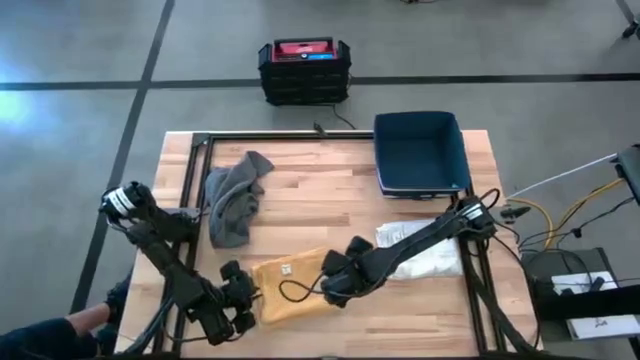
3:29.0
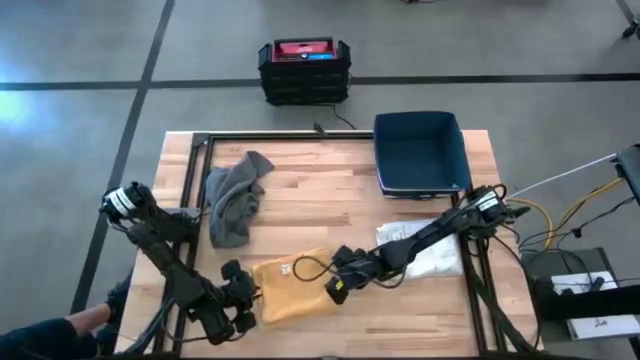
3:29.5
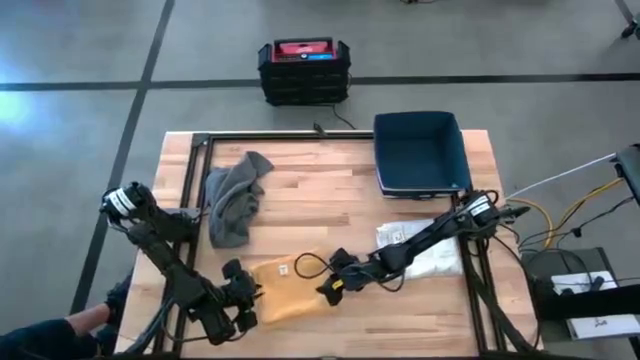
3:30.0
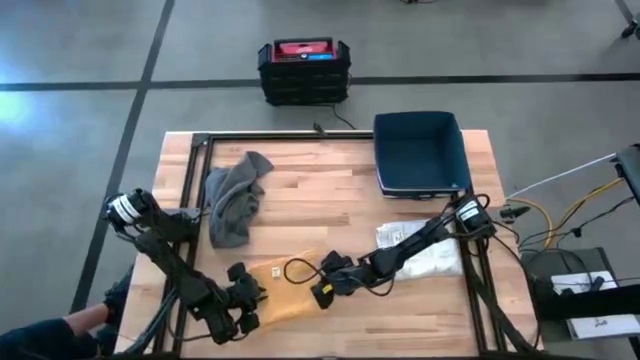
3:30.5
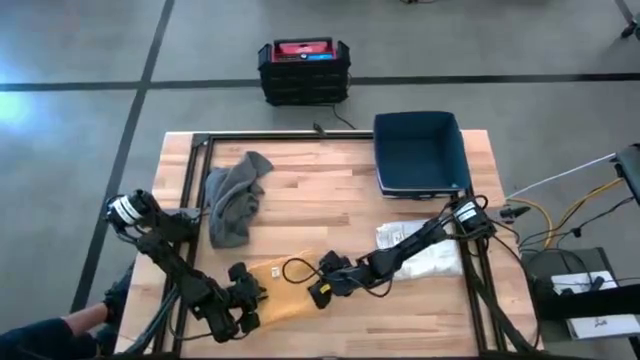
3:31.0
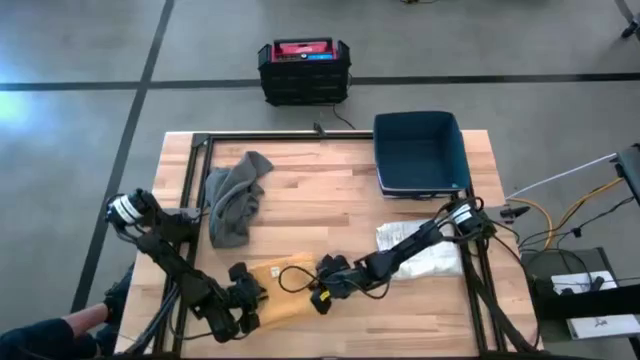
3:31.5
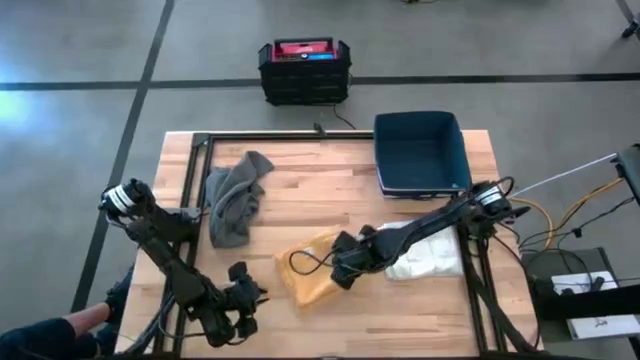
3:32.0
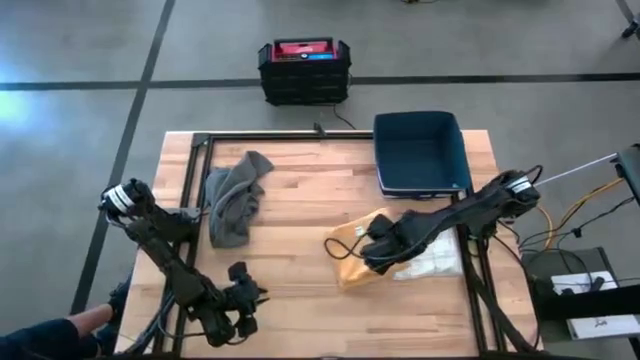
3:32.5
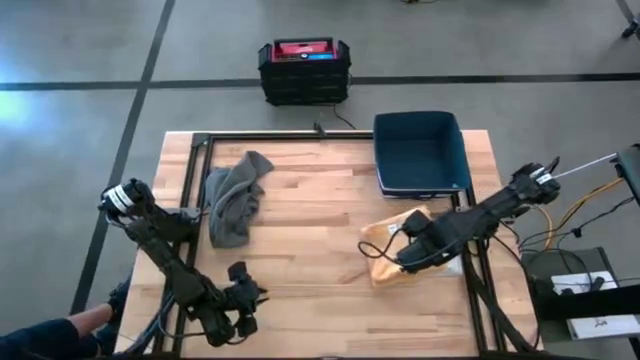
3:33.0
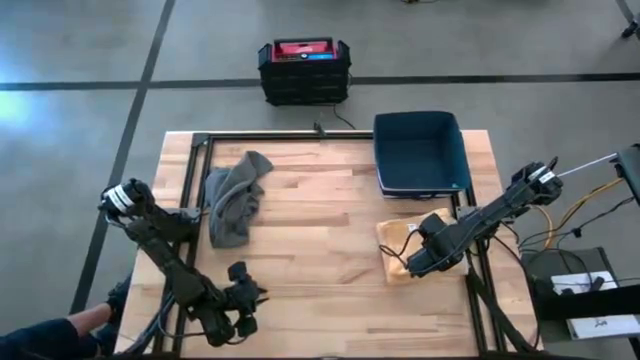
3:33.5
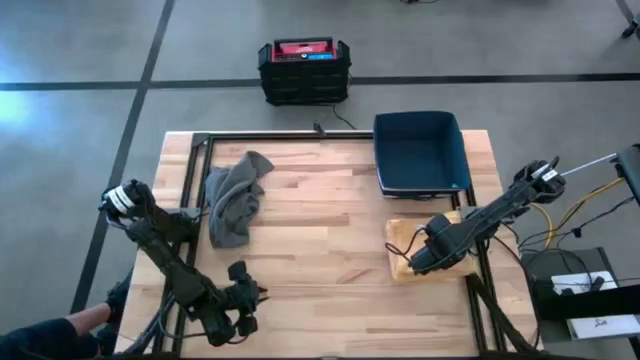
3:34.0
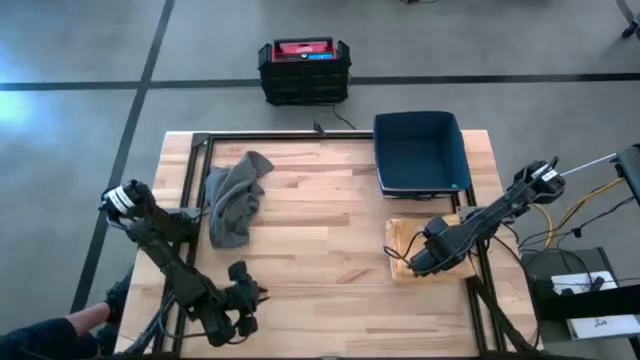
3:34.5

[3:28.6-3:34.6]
Task: Fold towel
Stack the folded yellow towel on top of the folded white towel

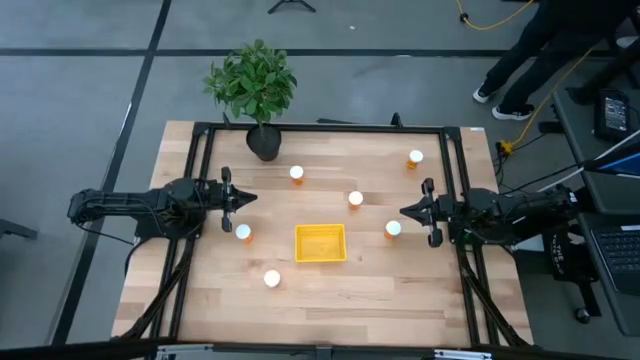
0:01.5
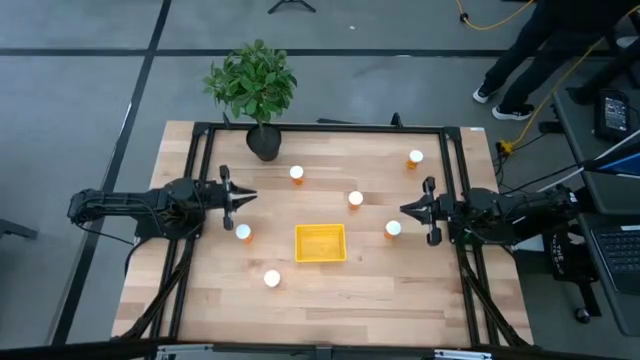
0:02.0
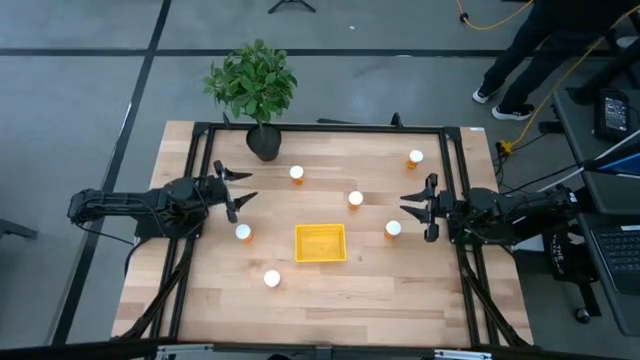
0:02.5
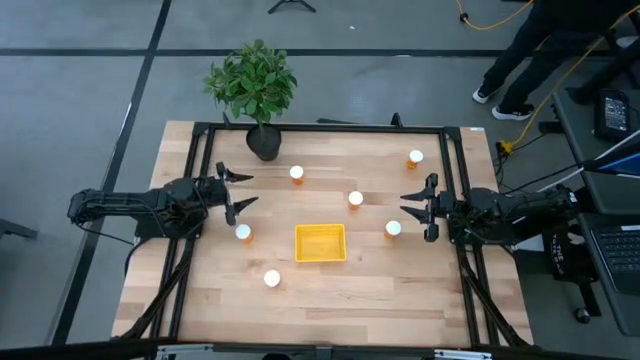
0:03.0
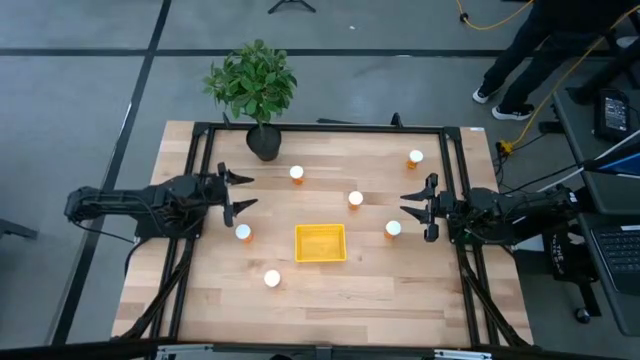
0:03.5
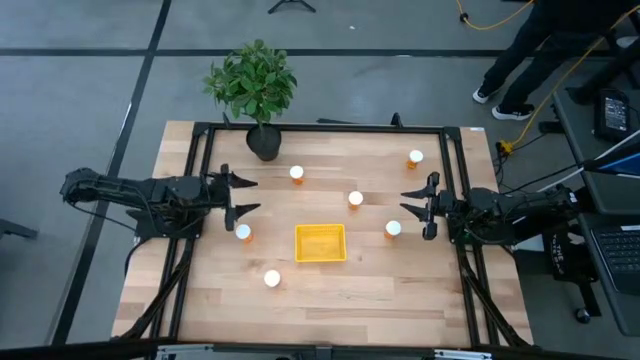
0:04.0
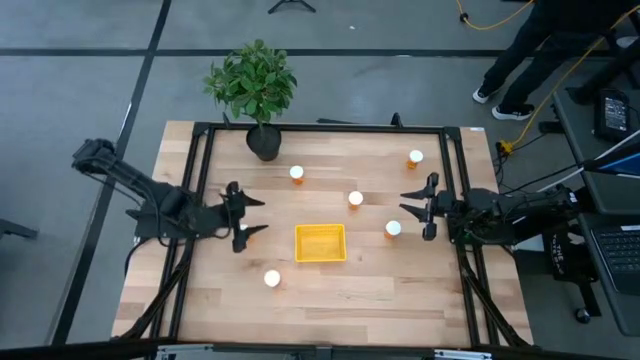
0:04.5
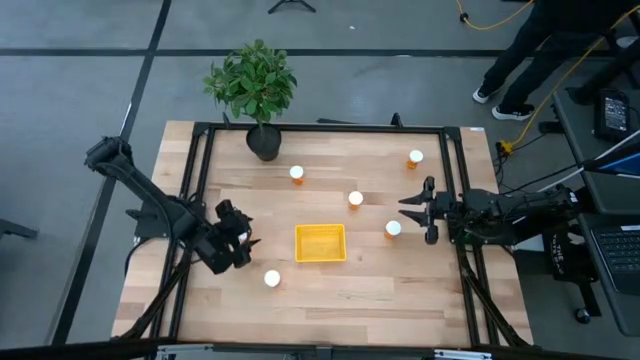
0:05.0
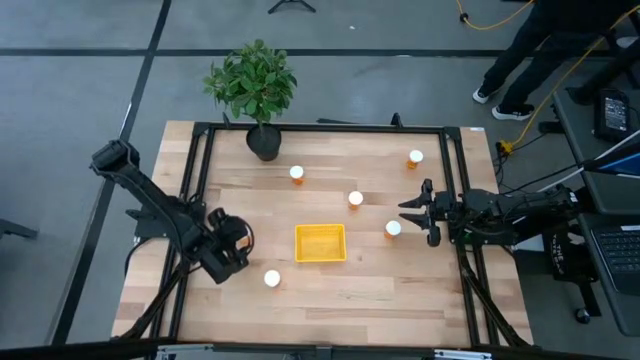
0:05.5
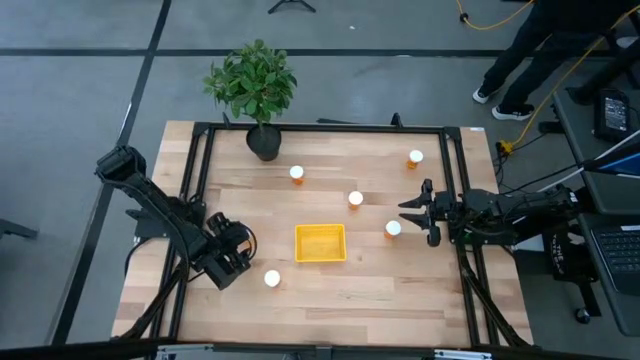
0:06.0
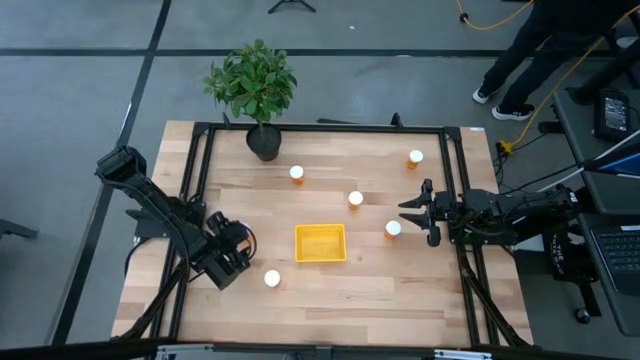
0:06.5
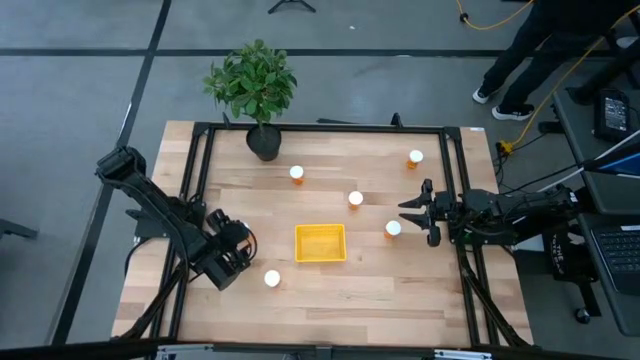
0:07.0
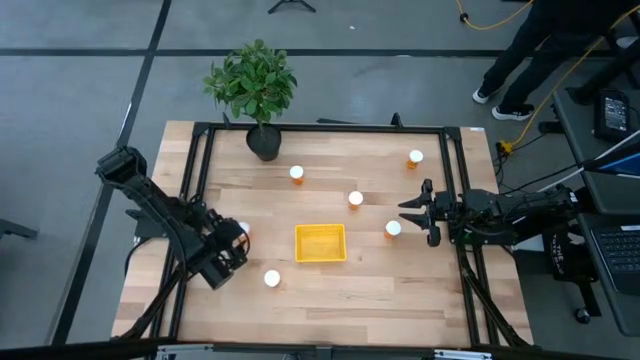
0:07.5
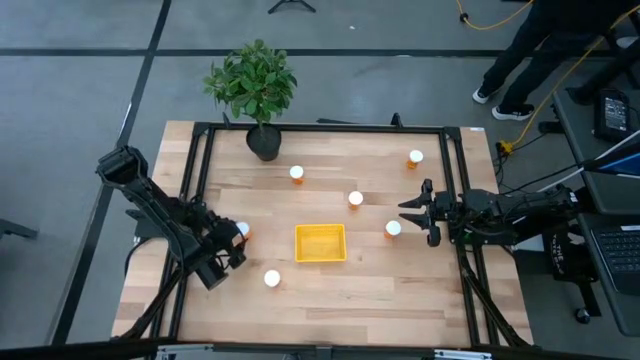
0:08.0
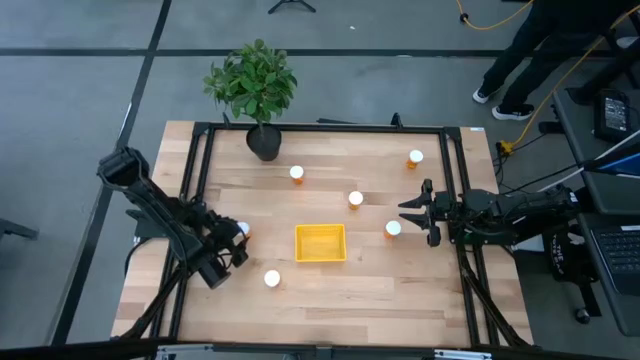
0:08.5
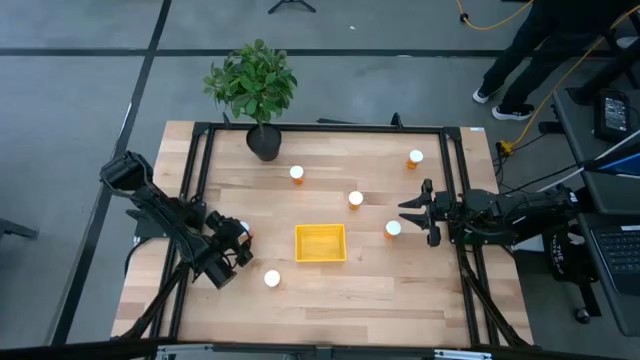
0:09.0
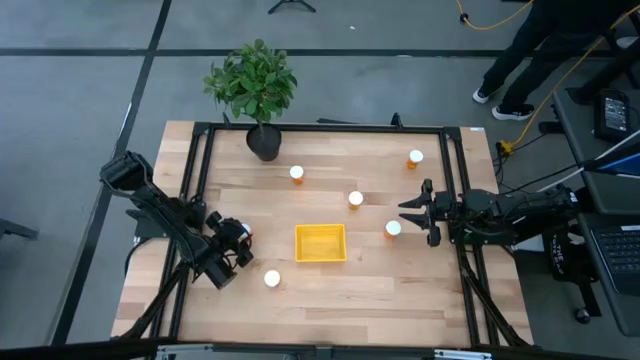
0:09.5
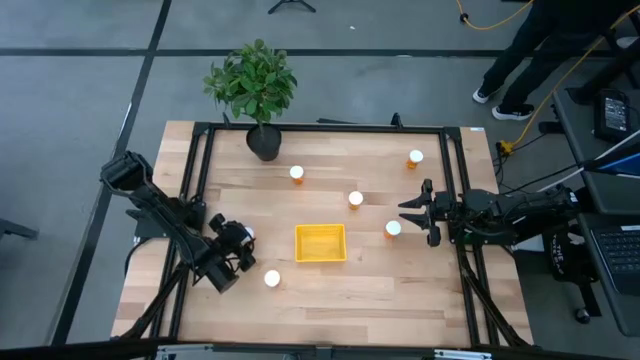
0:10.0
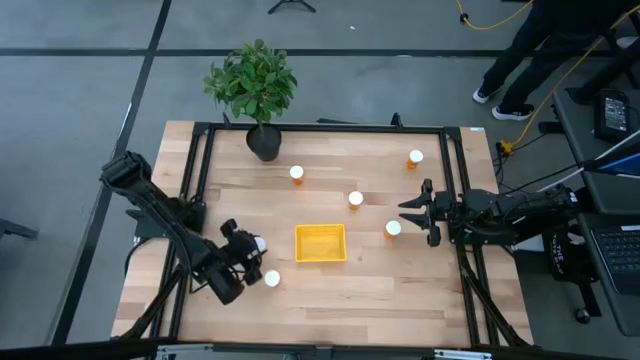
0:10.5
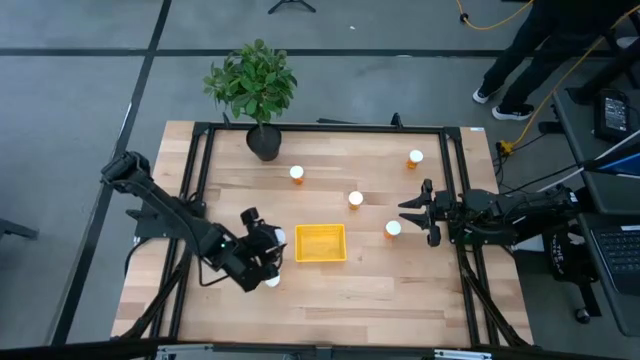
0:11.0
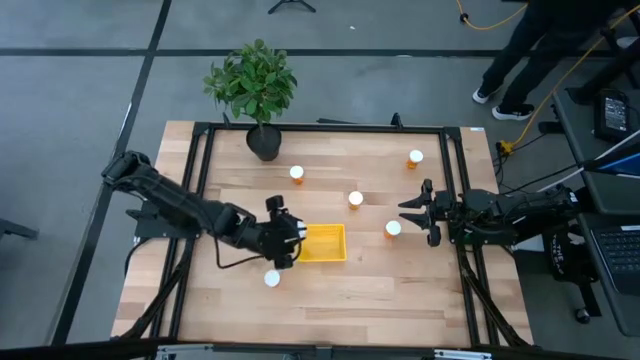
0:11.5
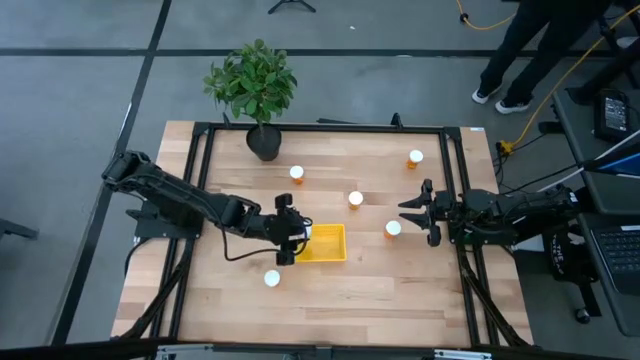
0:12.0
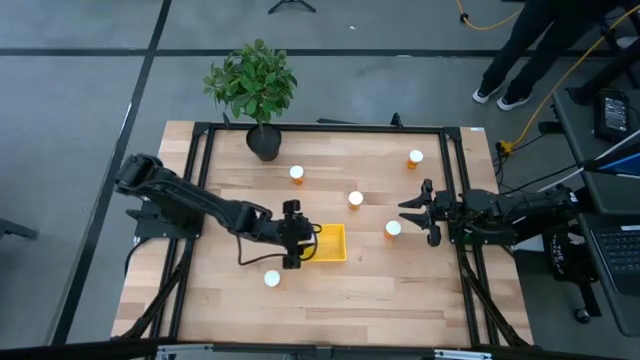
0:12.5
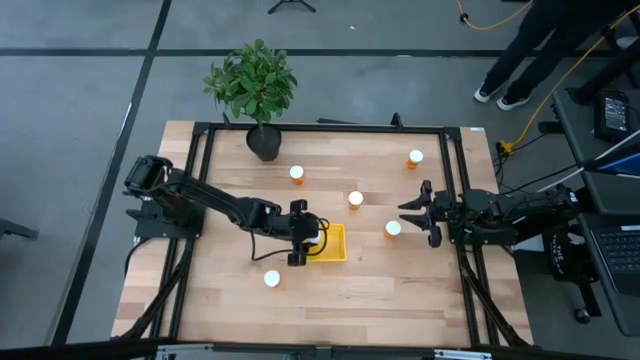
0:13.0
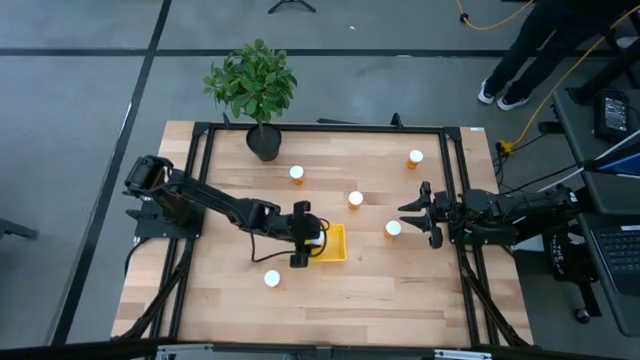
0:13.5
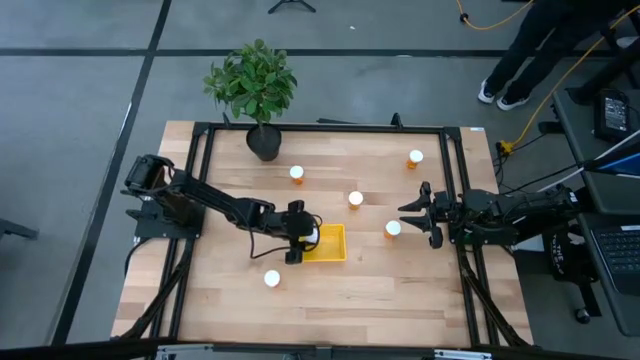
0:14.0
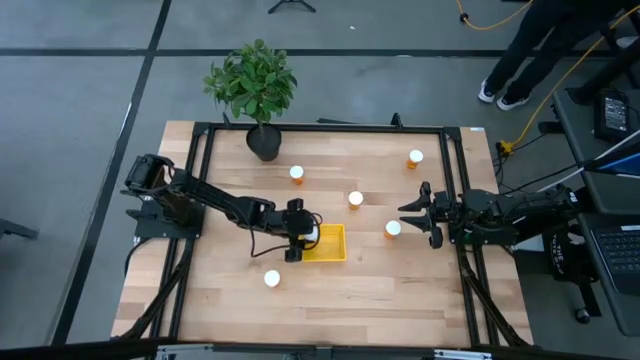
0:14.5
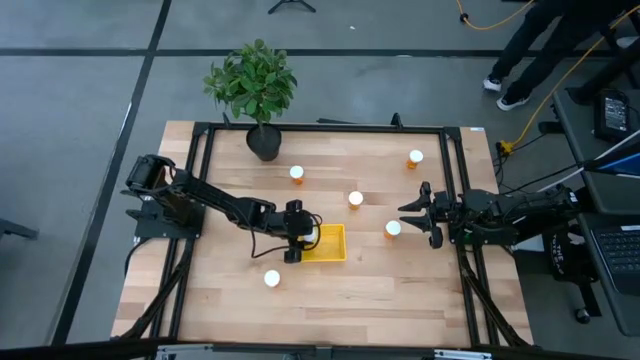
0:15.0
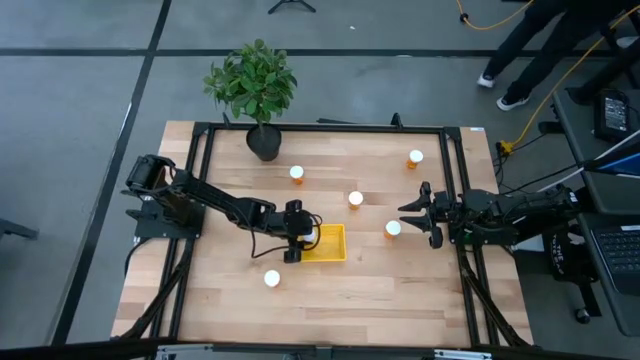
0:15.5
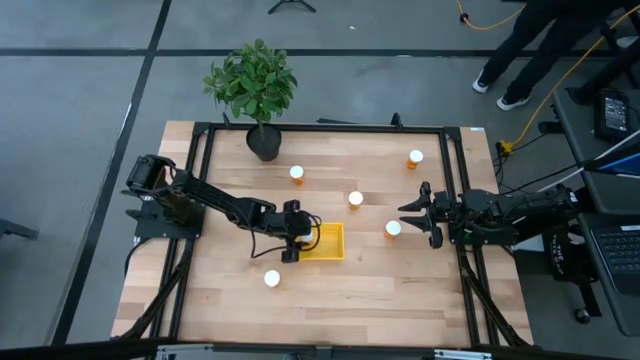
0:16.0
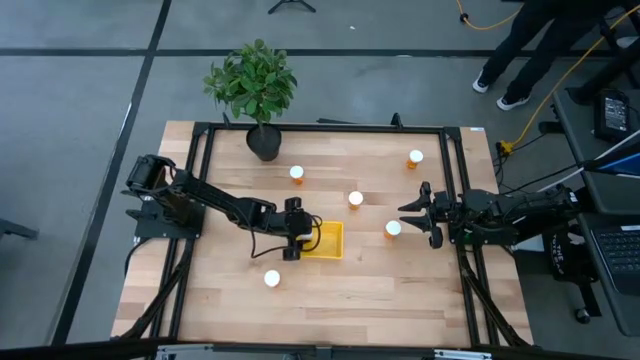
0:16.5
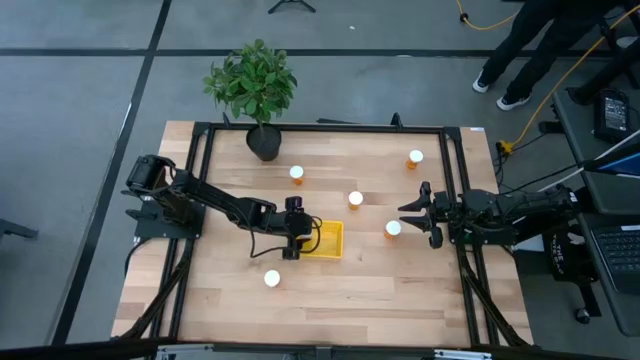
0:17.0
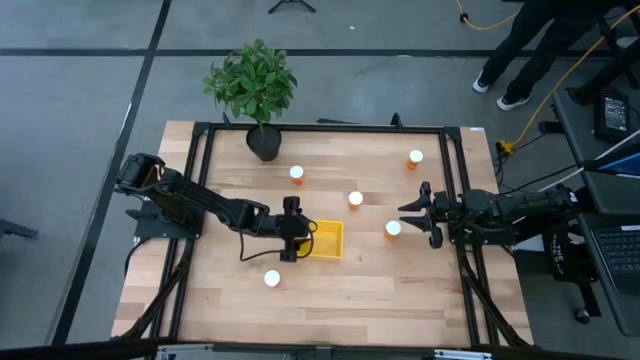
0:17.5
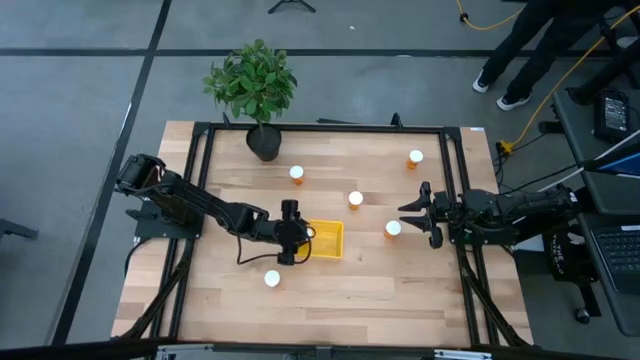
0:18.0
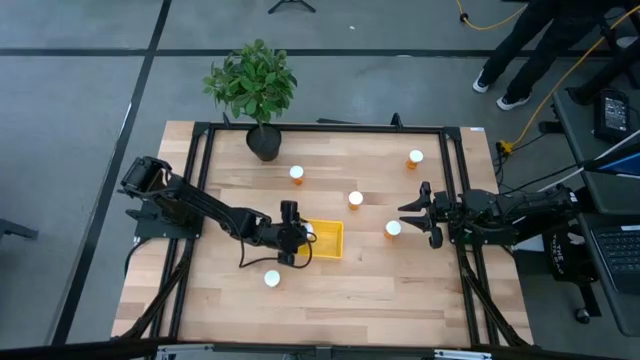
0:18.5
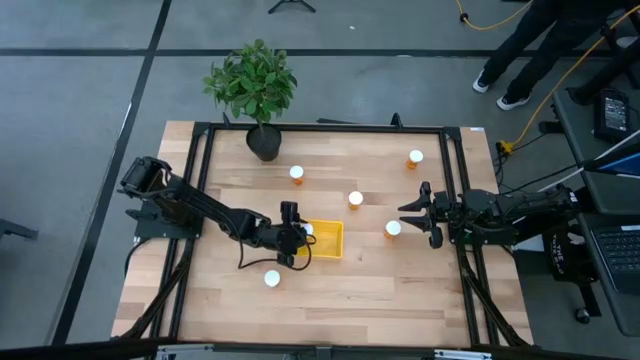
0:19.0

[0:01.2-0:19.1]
Task: Pick and place pill bottles into a basket
Put the orange pill bottle into the yellow bin
